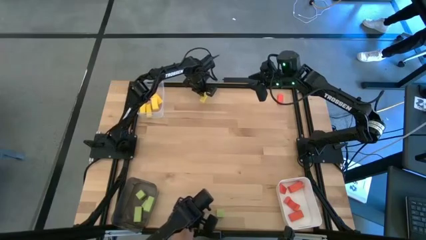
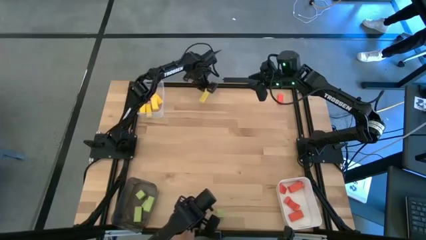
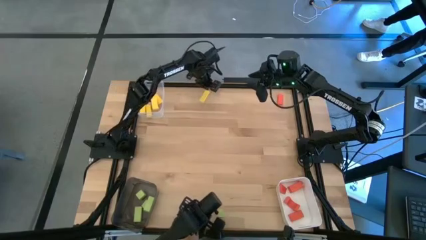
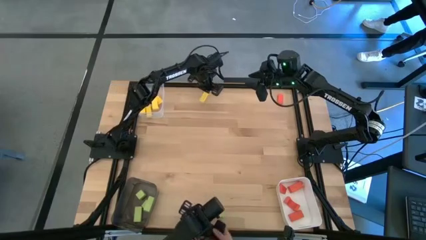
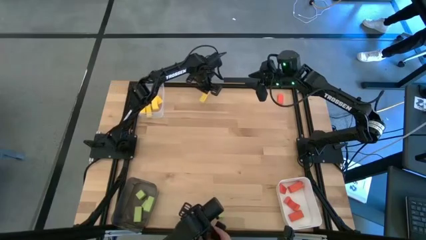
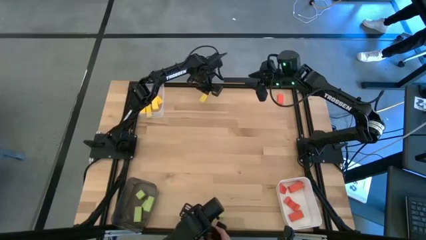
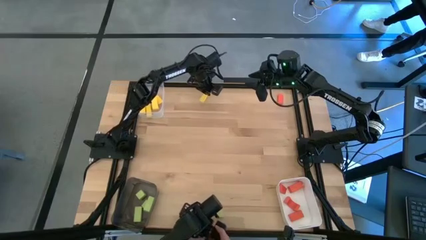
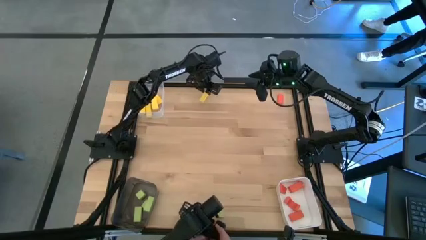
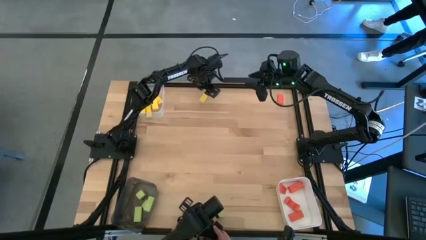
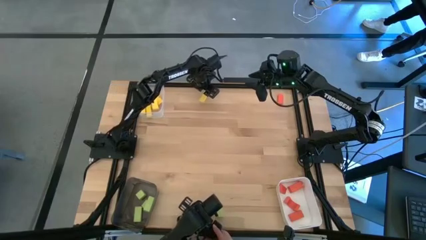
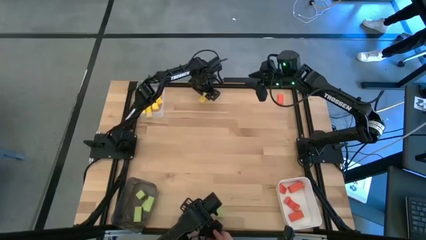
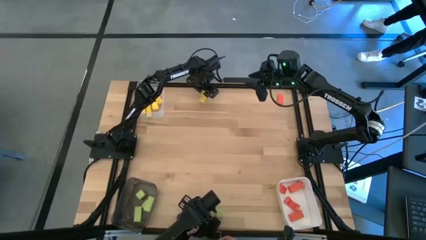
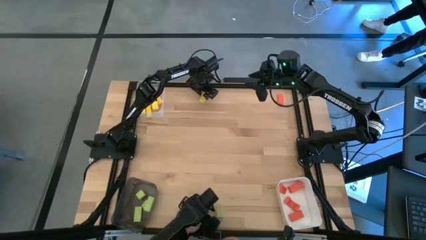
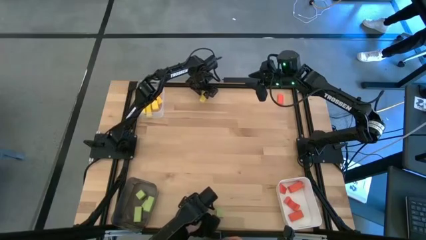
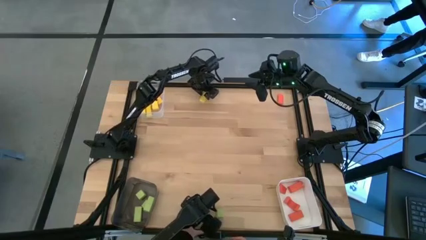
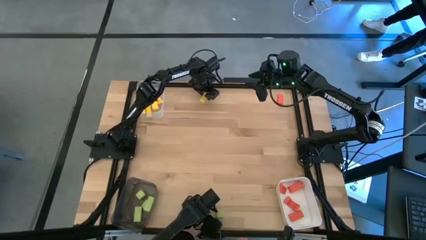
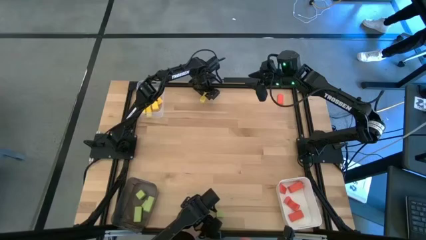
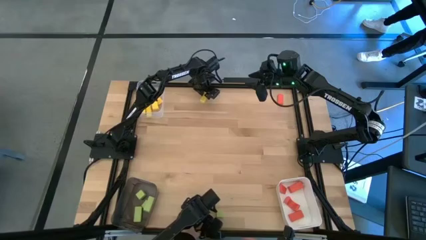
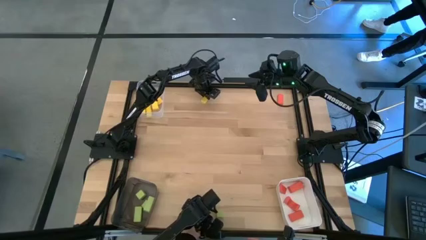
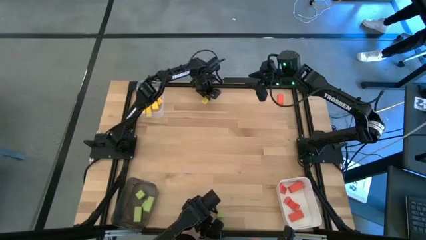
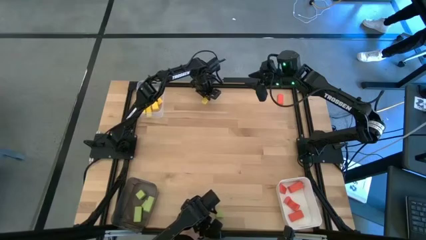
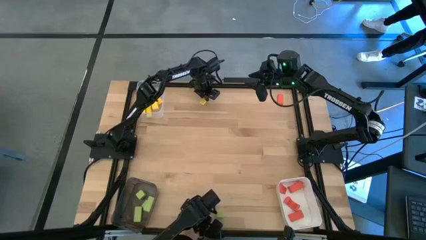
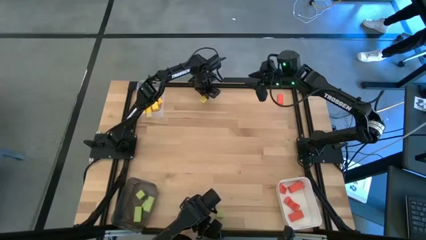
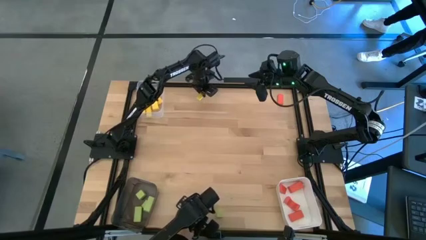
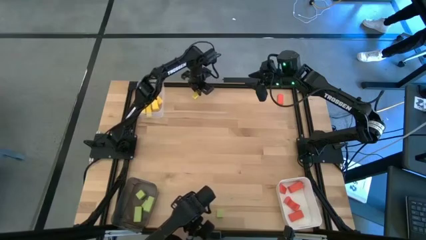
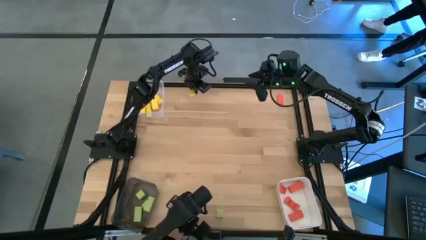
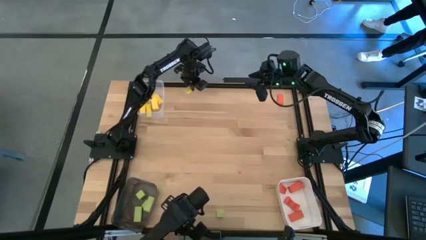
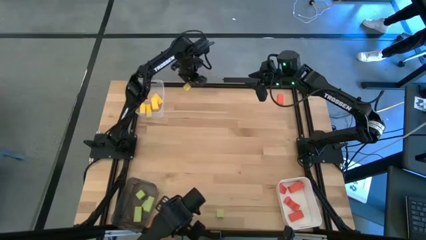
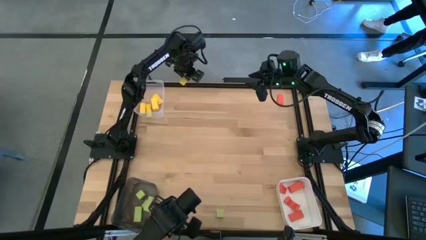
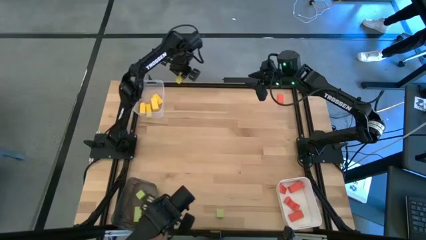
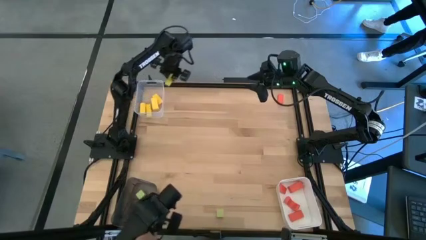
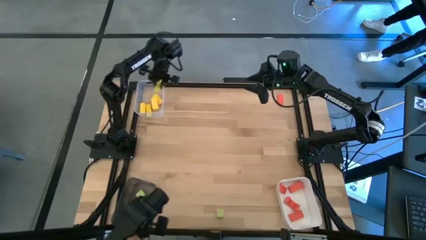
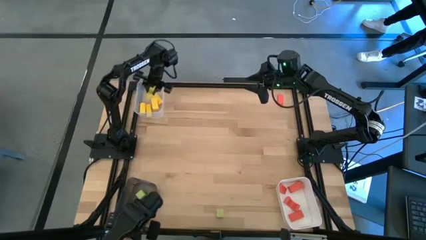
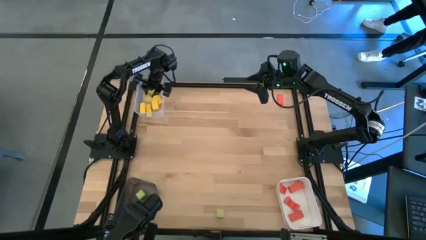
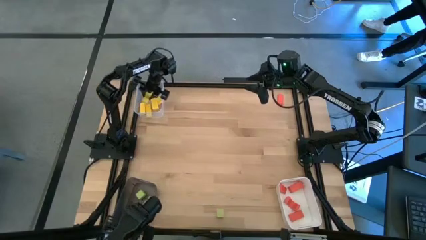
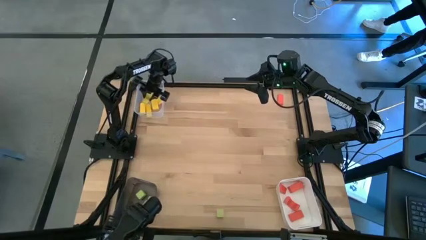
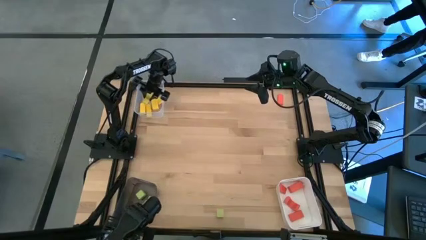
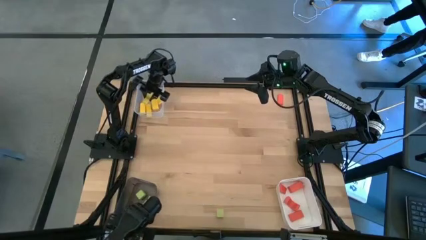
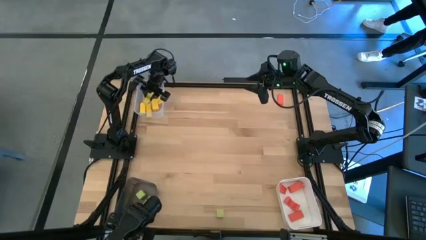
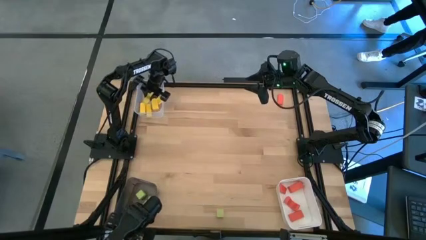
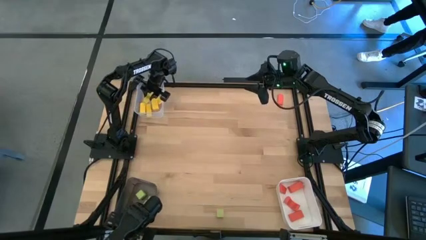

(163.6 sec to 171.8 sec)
Task: Sort & place blocks by color
Put the yellow block into the transparent bin

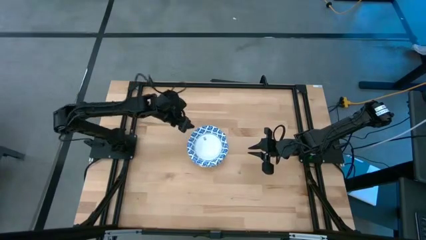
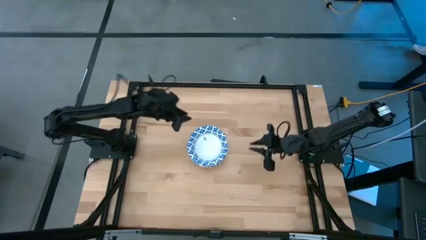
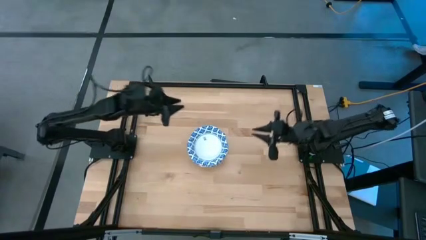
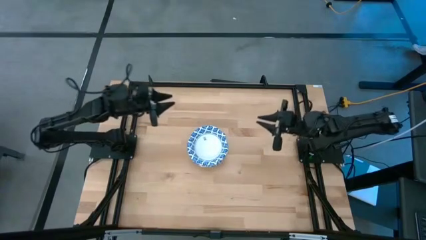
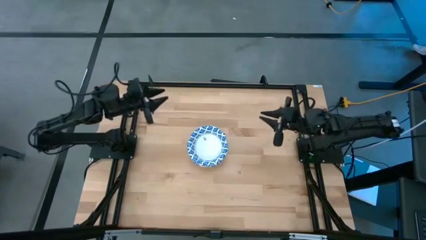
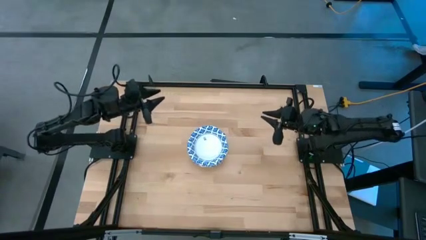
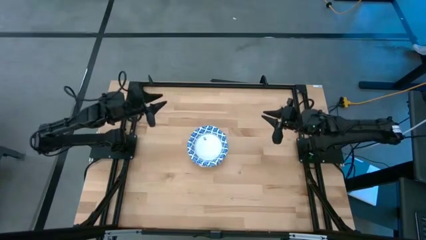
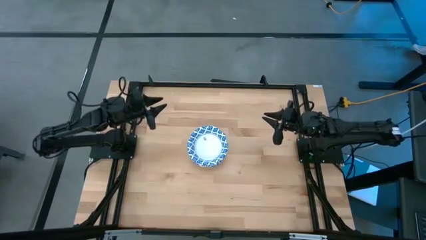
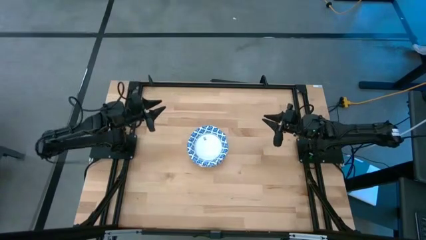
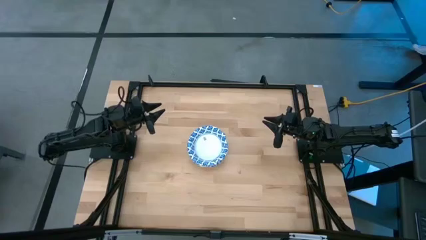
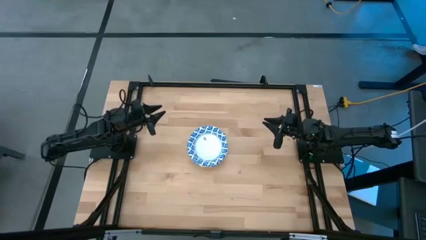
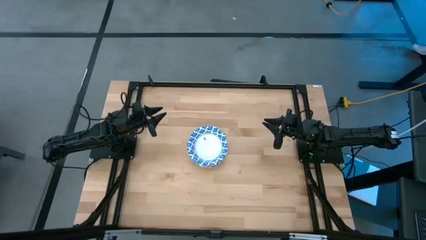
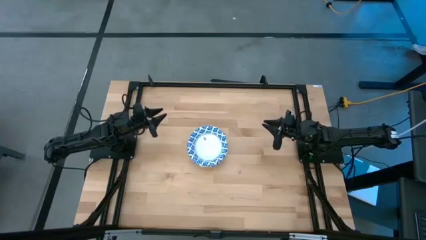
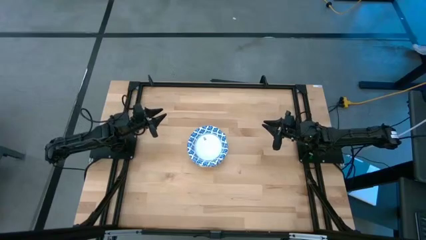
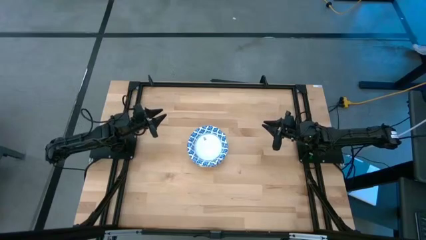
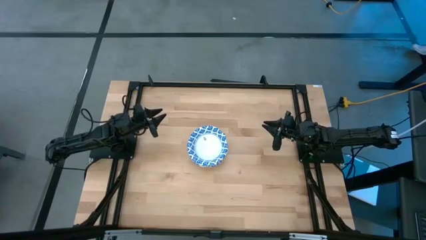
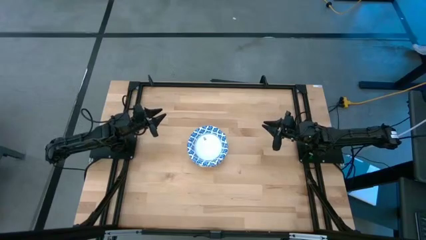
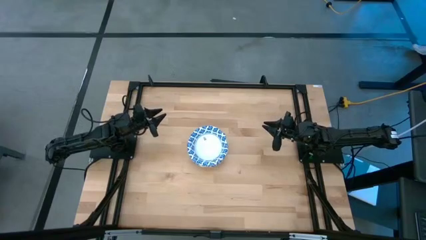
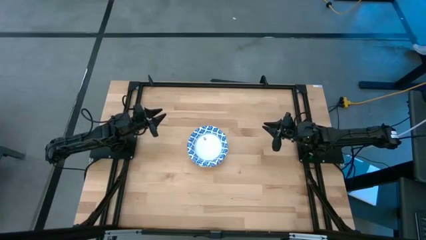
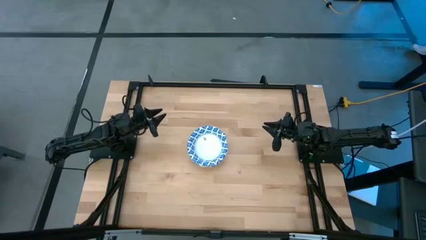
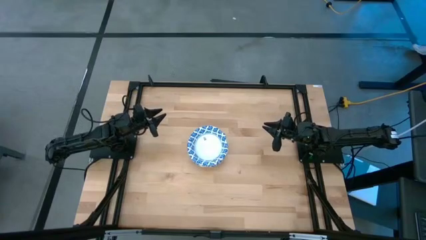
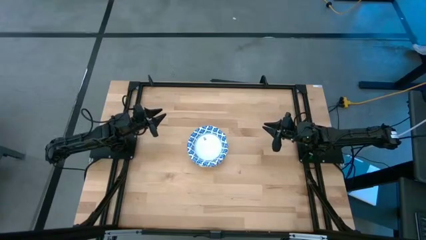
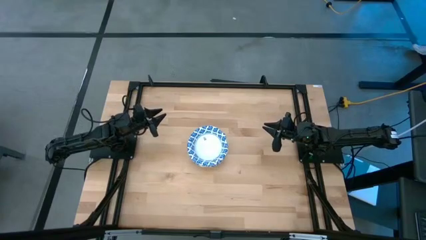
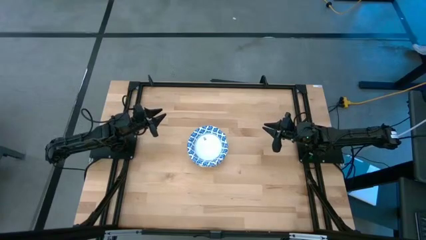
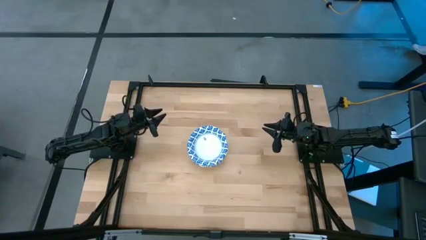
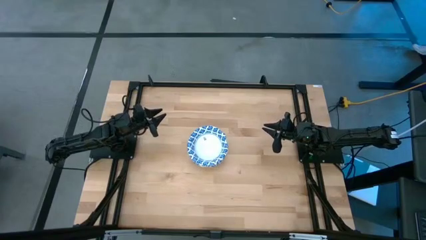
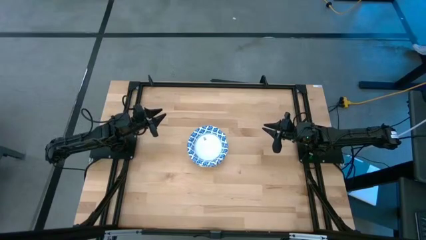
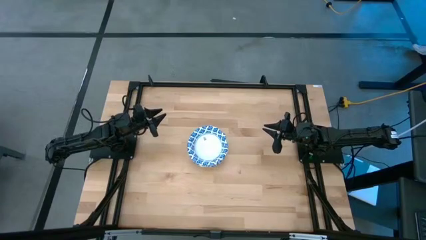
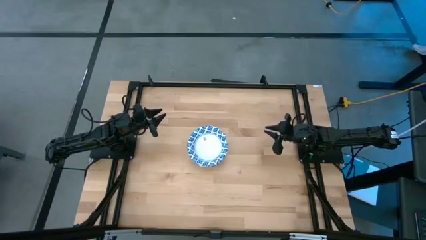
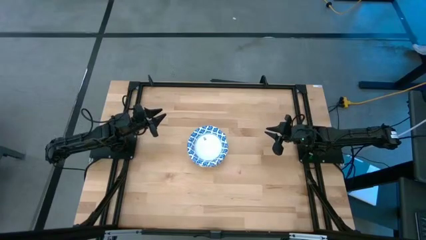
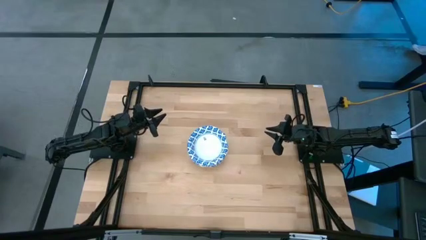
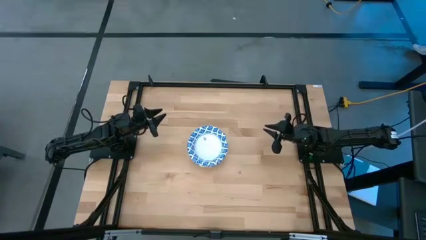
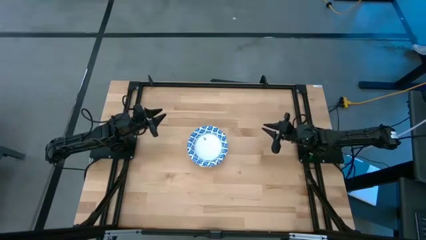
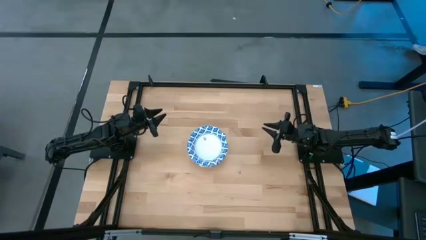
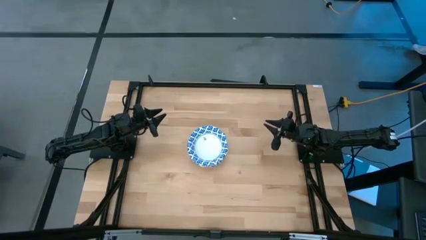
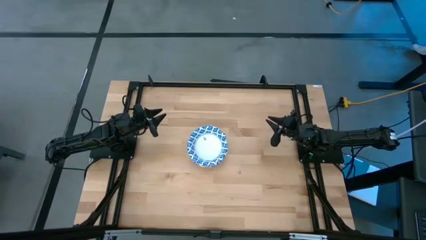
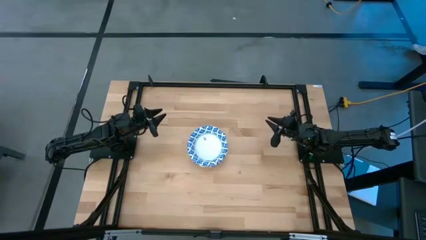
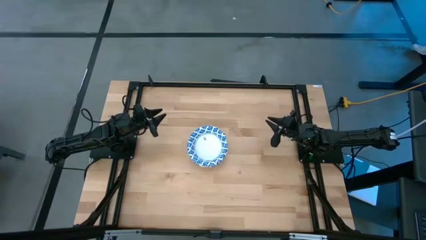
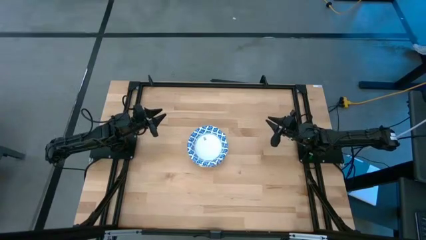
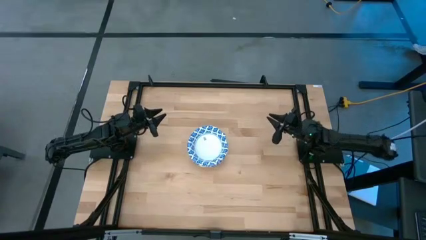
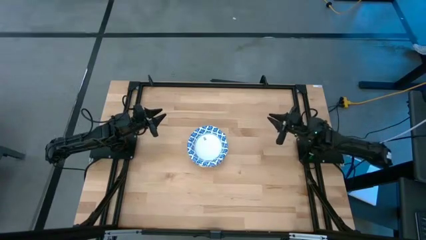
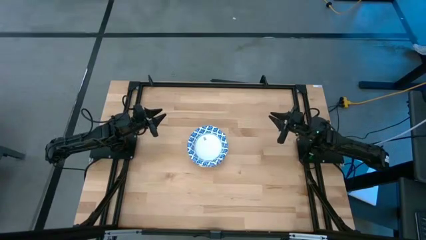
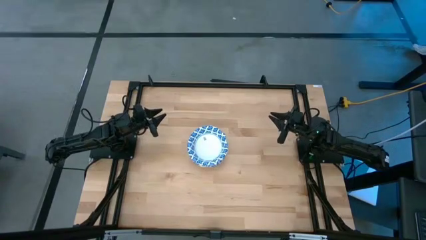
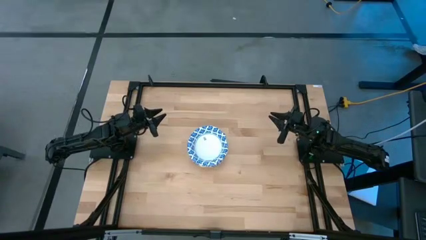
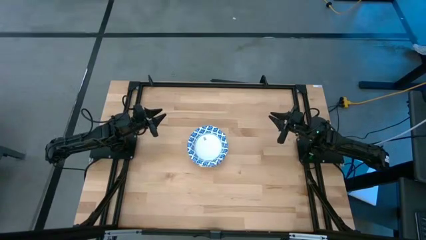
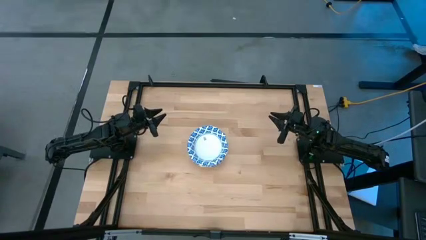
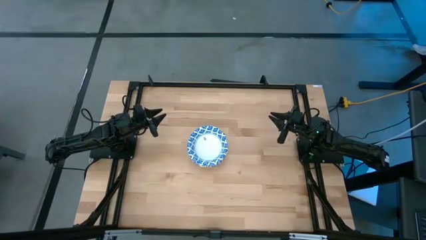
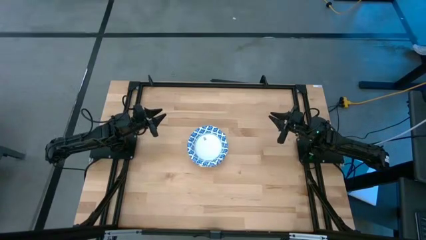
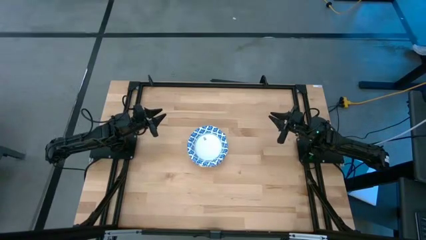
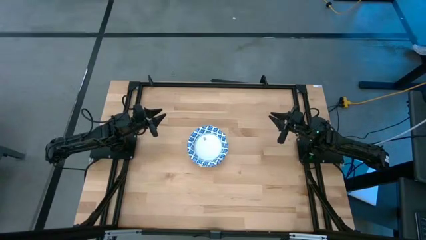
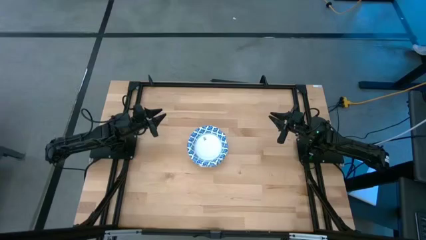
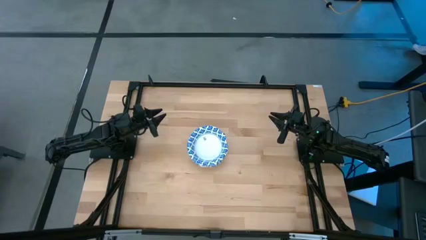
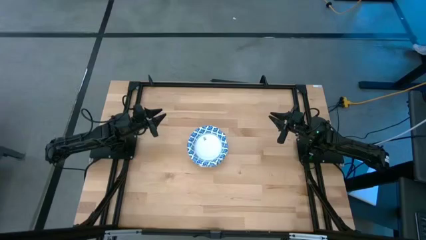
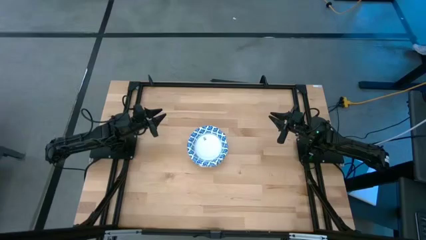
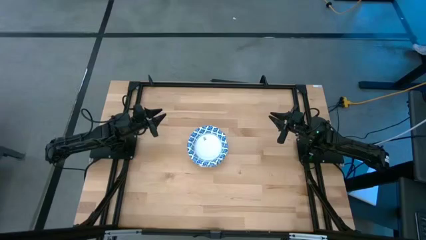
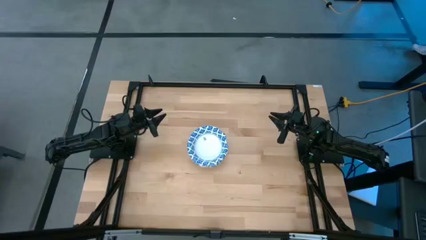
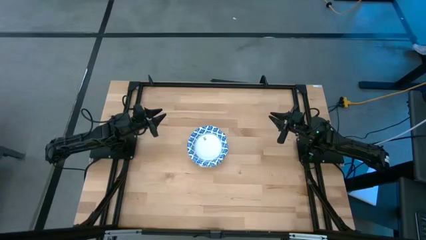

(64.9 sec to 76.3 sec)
Task: Nest bowls inside each other
Return to Home Position
